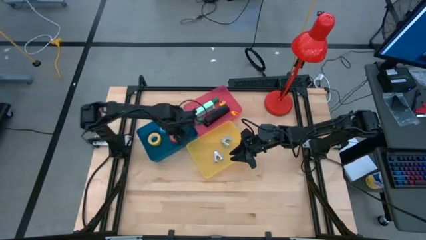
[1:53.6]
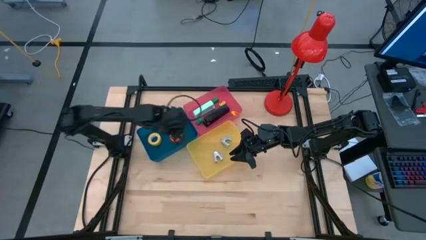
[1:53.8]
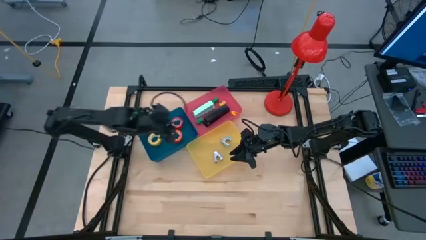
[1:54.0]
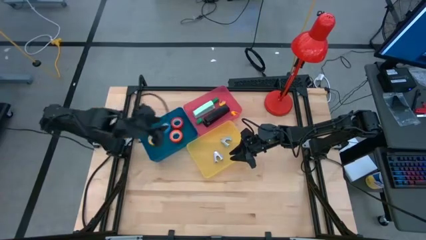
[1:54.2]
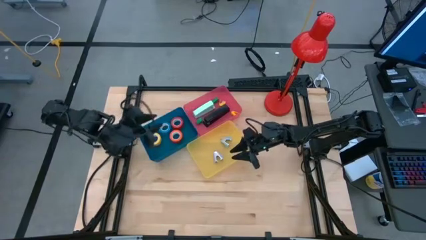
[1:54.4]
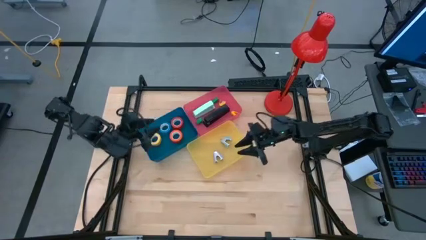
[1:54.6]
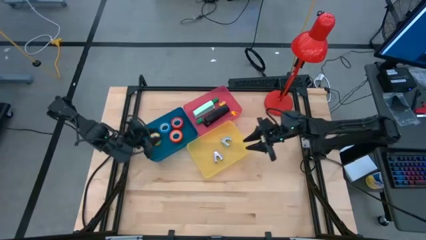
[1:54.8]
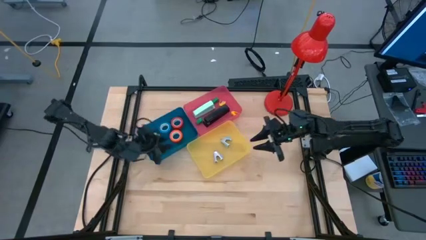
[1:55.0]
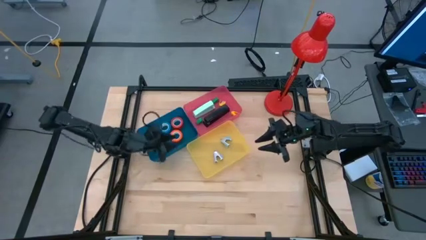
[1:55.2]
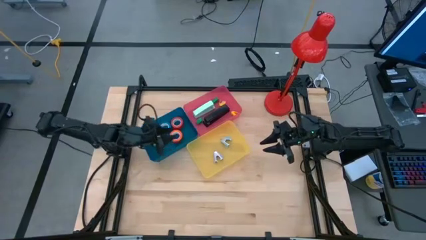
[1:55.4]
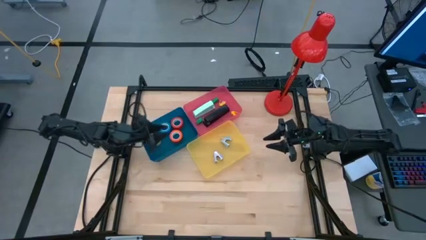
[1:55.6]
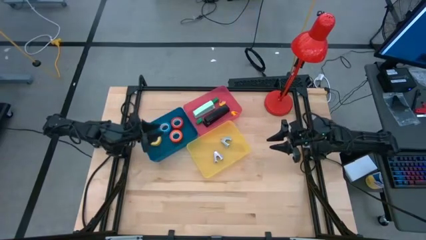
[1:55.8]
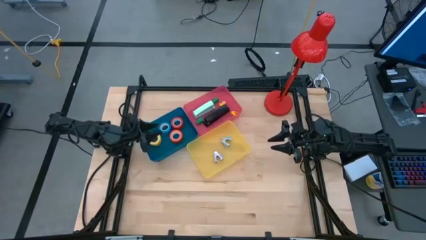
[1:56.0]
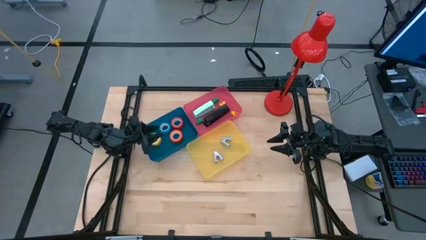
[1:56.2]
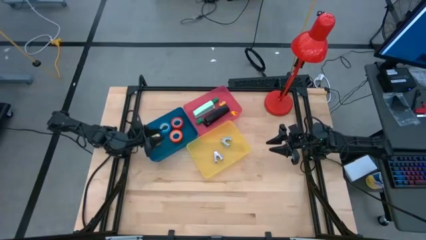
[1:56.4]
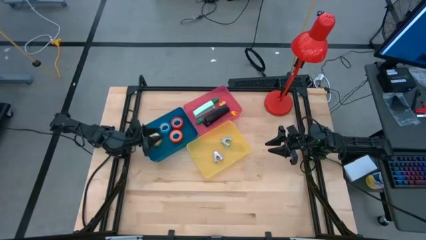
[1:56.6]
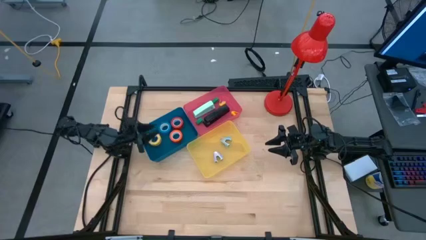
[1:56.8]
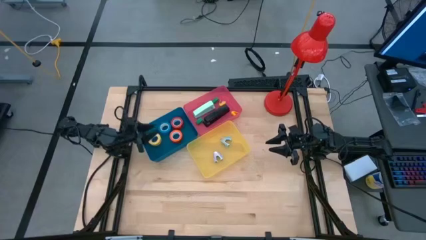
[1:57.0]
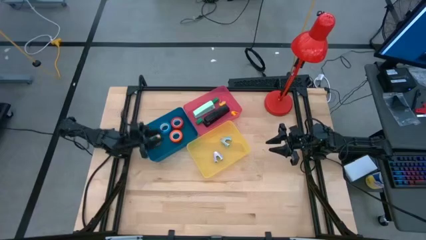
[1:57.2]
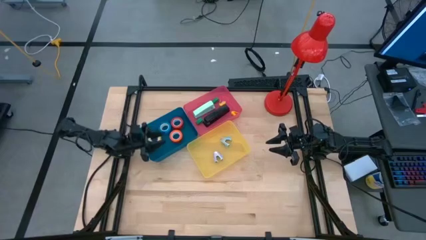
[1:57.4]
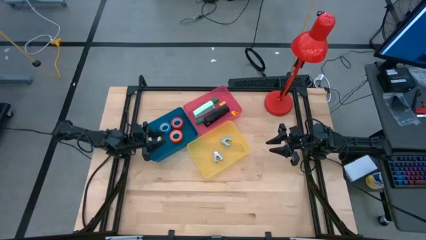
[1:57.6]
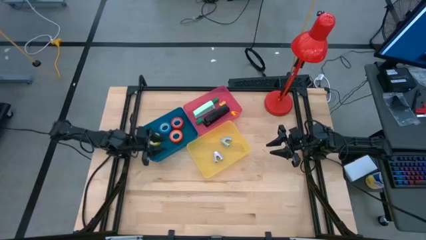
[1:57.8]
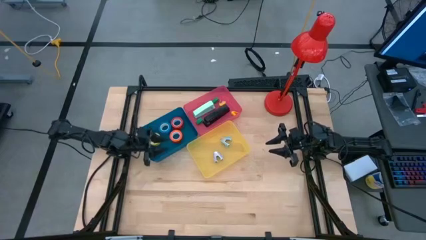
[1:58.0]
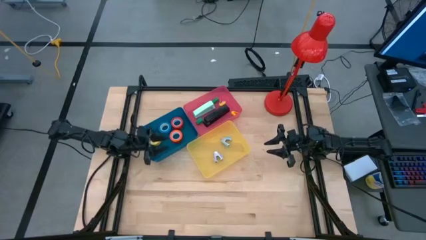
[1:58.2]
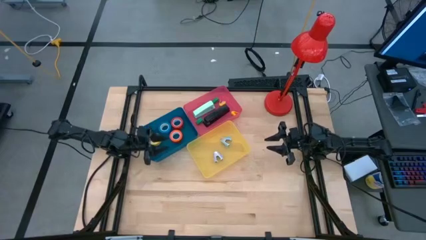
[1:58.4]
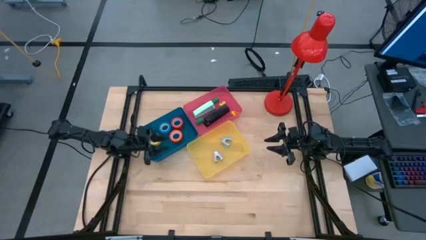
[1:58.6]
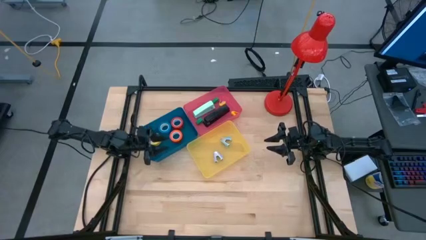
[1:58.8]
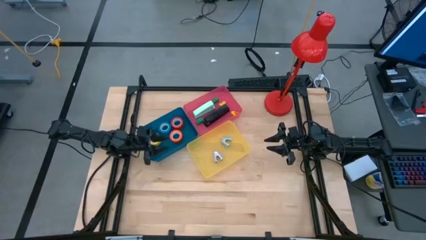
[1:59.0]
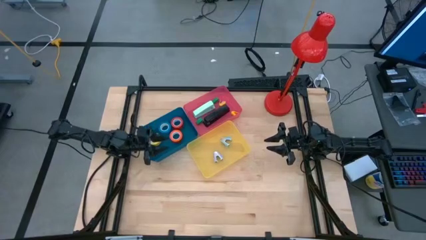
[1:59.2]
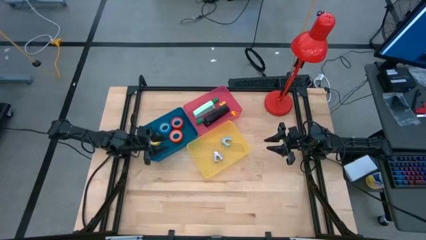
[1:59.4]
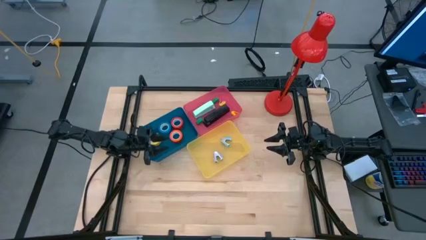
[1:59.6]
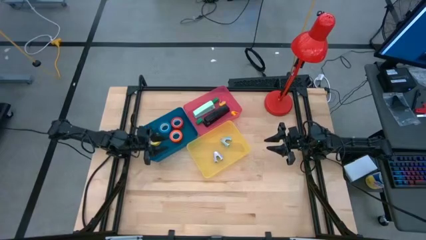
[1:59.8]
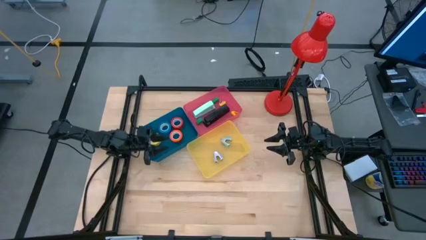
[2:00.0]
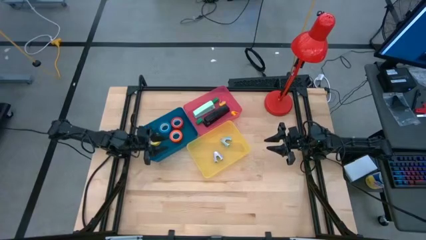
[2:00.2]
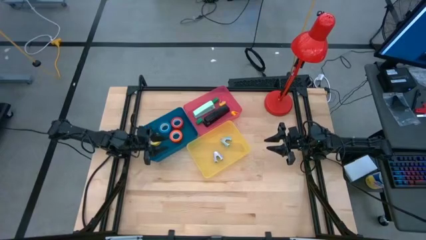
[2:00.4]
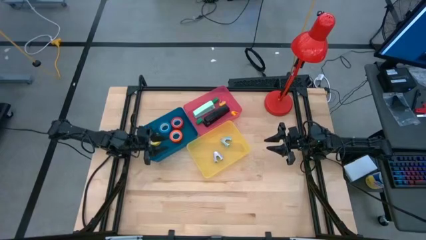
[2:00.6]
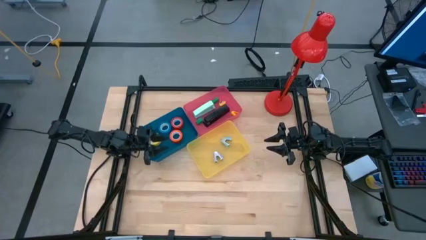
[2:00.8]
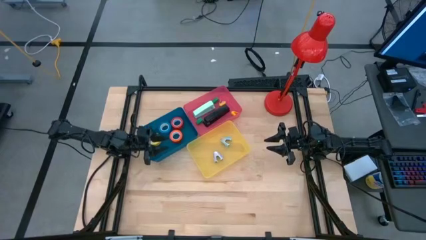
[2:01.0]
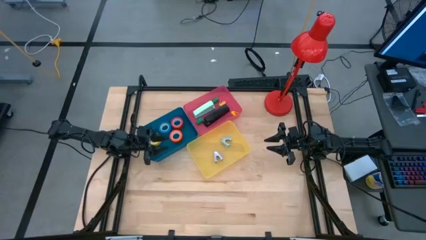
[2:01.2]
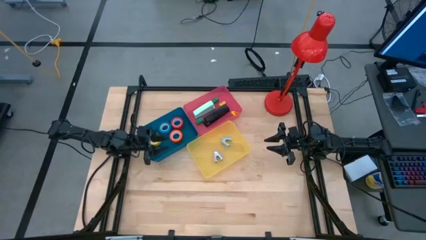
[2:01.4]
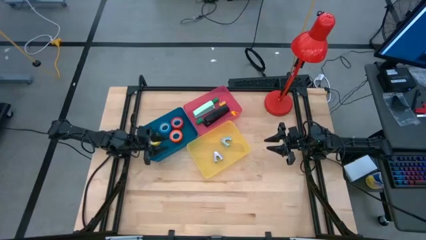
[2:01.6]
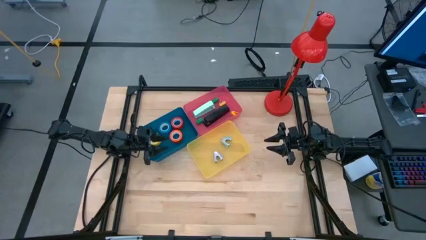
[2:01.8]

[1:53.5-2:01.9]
Task: Pick and place Stapler, Stapler remover, tape
Return to Home Position

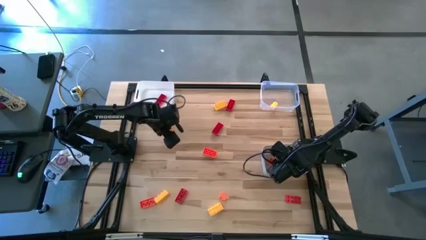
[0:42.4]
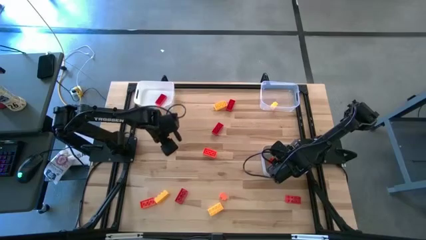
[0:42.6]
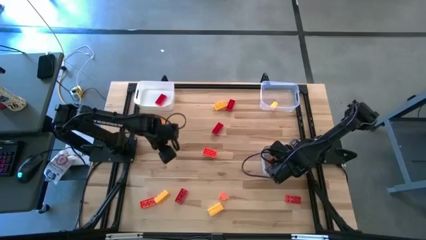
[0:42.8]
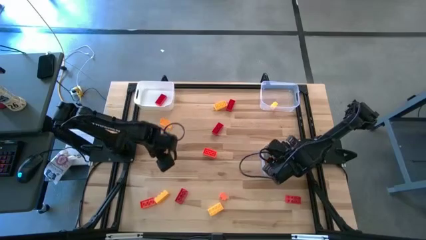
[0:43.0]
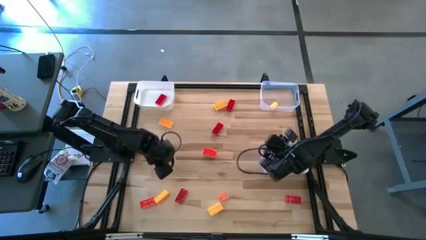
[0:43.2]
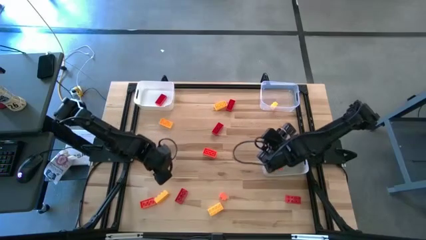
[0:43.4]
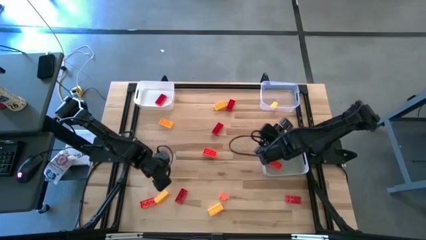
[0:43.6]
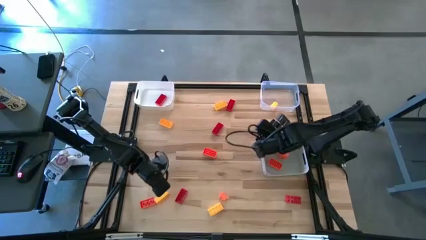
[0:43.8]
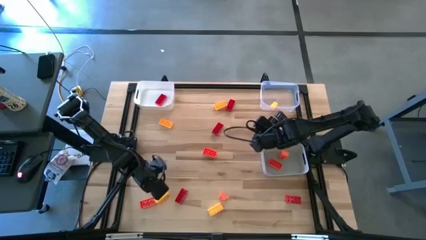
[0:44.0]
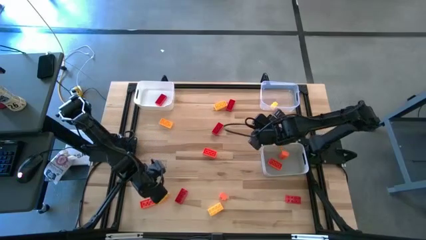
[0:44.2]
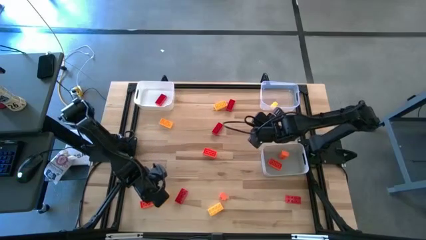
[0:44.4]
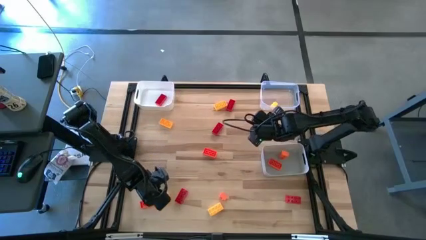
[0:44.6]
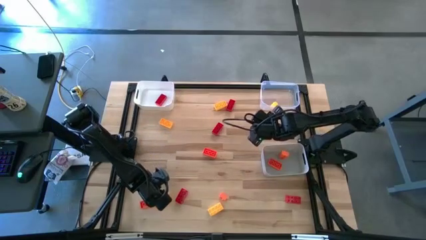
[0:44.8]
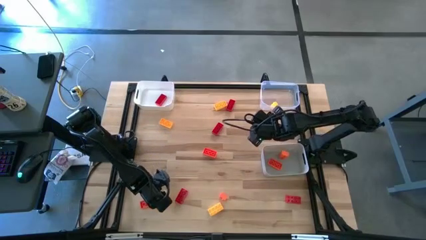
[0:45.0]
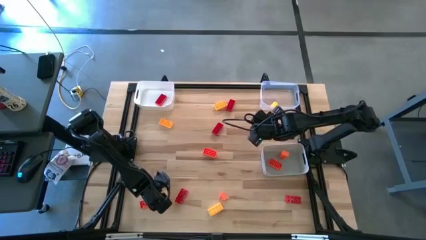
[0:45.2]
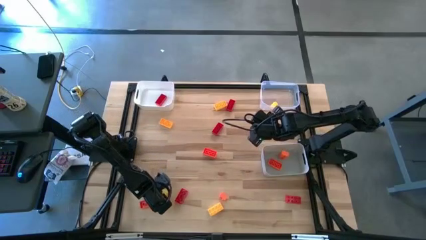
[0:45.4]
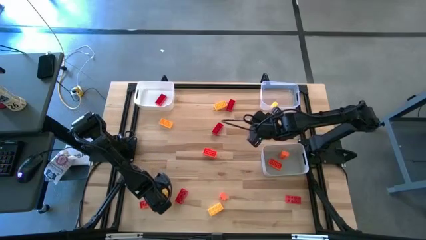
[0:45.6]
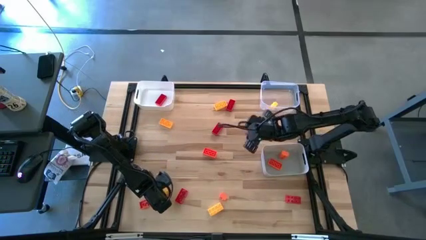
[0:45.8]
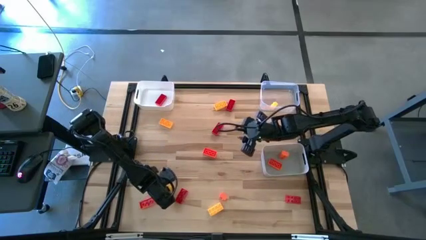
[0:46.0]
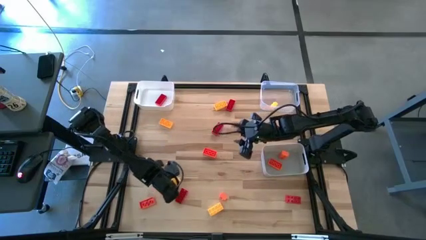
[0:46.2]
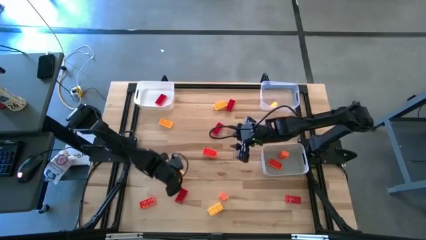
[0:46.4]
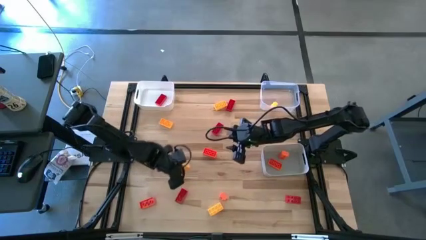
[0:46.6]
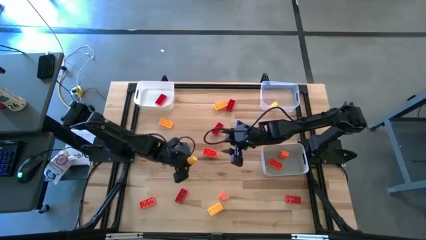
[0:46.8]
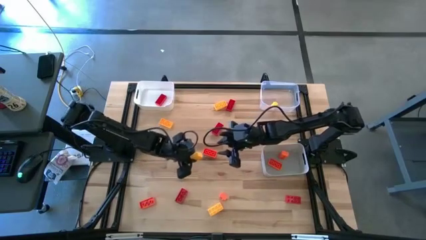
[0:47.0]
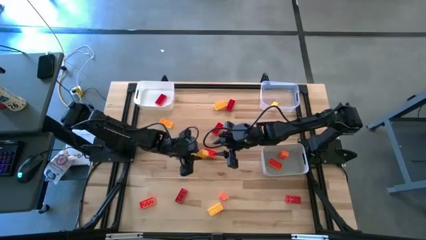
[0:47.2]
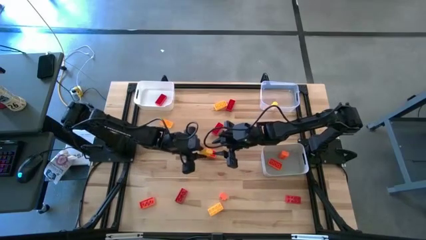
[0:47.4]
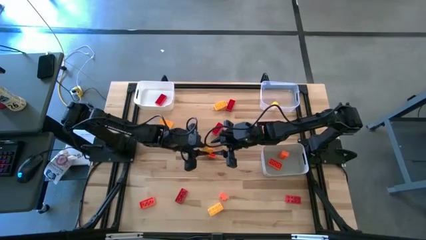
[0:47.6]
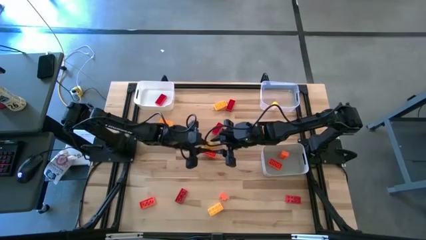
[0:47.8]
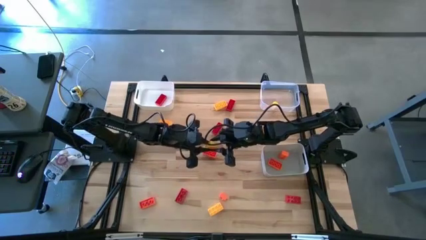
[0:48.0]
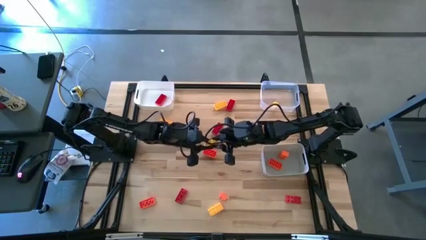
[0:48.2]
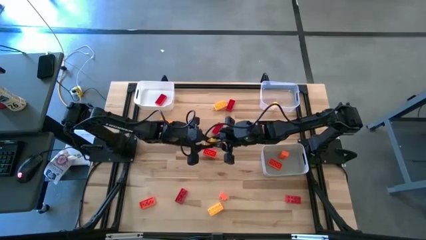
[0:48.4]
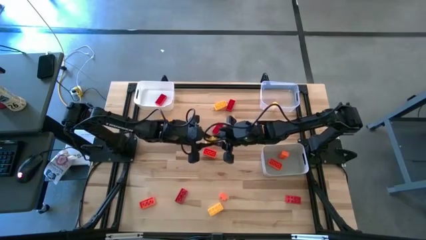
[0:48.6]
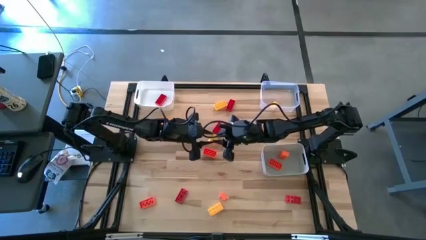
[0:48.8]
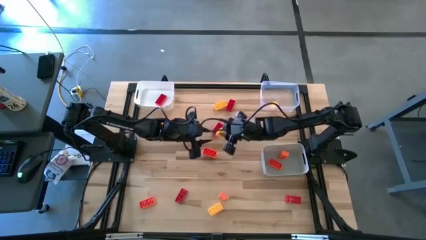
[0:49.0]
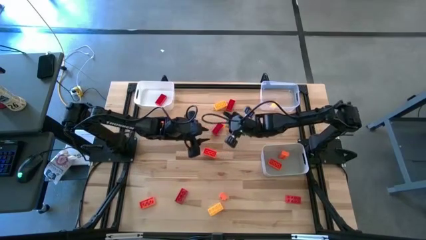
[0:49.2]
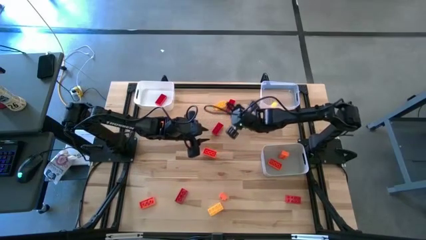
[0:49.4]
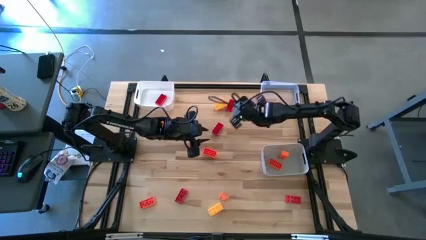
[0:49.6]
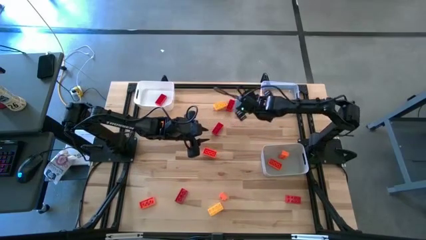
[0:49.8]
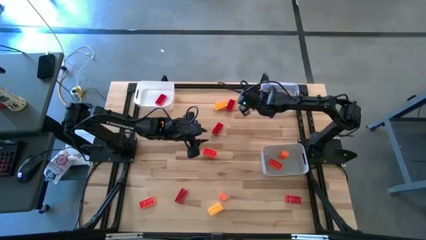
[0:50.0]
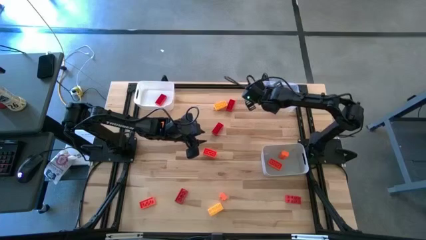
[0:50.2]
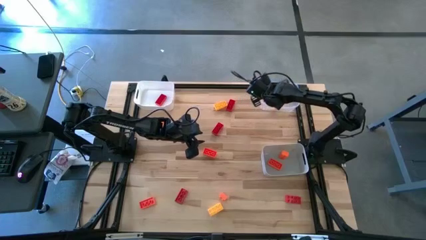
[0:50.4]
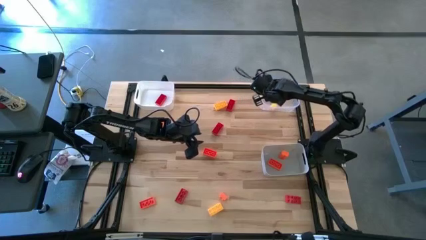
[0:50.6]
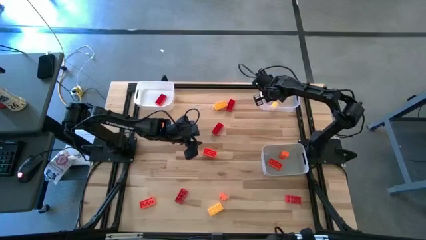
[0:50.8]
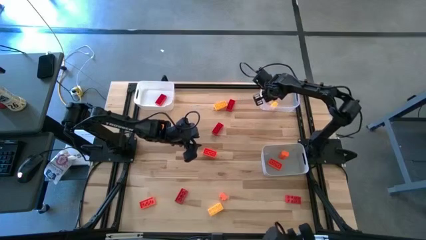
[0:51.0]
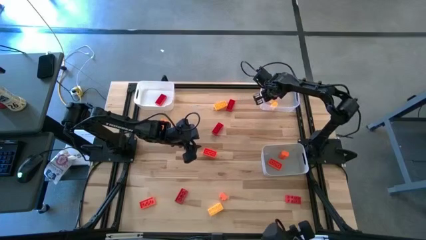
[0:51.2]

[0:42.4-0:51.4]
Task: Sort & place blocks by color
Put the yellow game piece into the transparent bin
